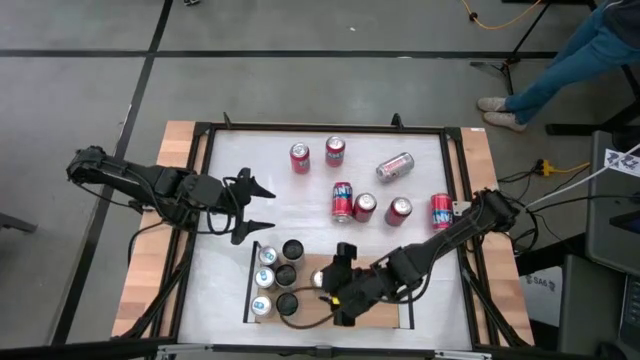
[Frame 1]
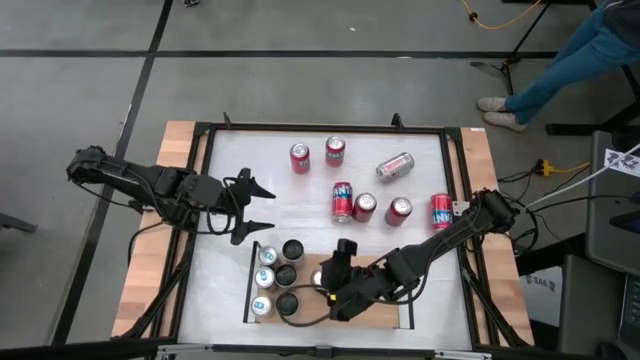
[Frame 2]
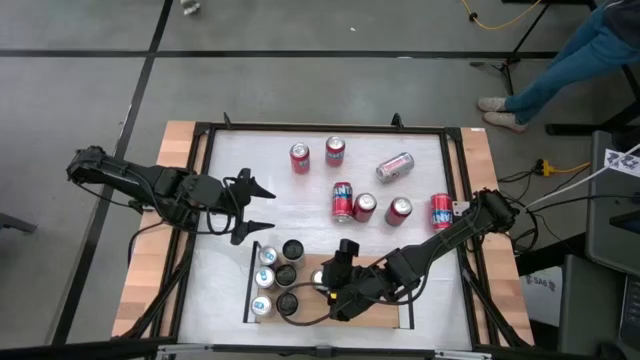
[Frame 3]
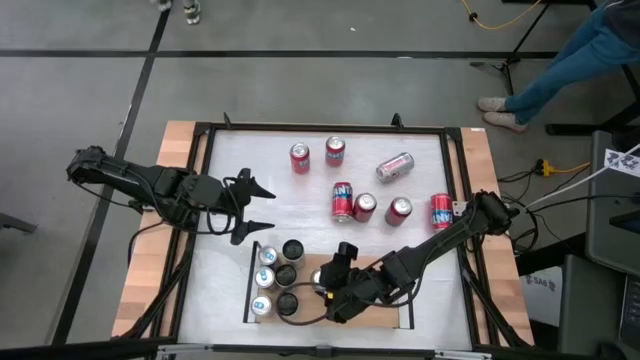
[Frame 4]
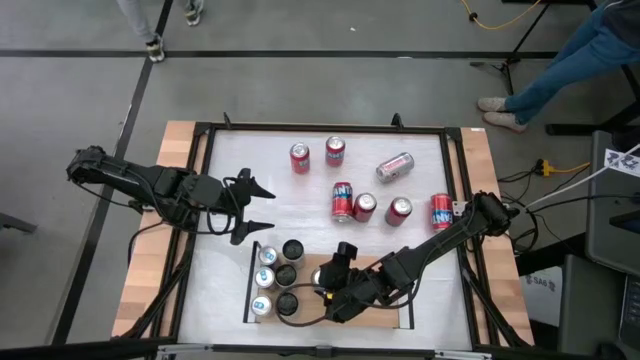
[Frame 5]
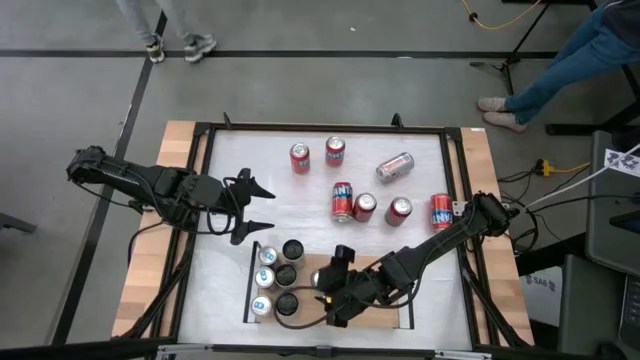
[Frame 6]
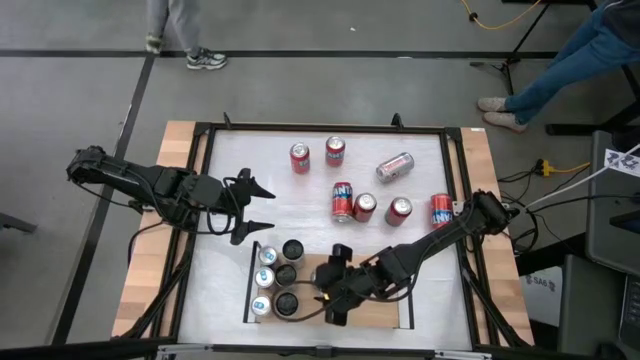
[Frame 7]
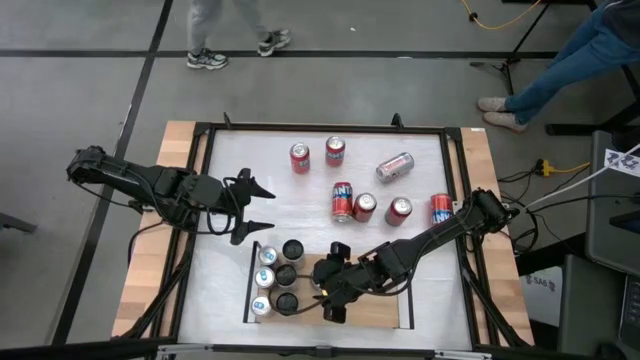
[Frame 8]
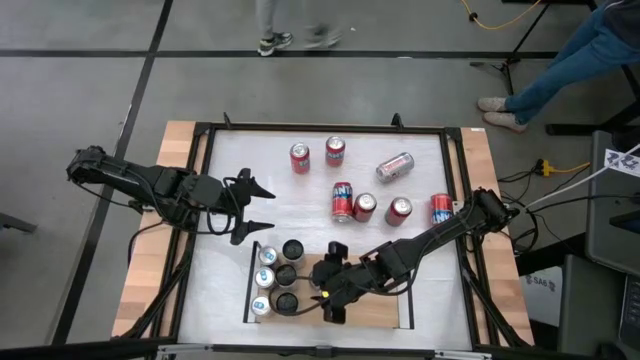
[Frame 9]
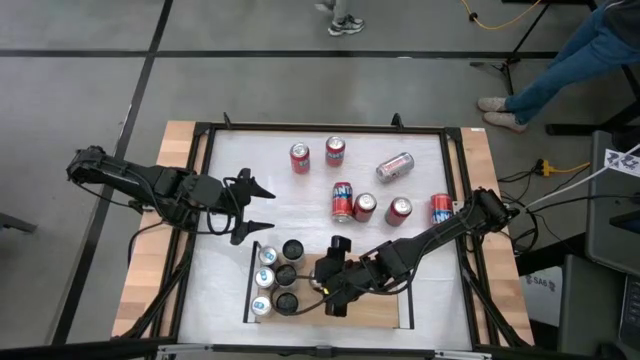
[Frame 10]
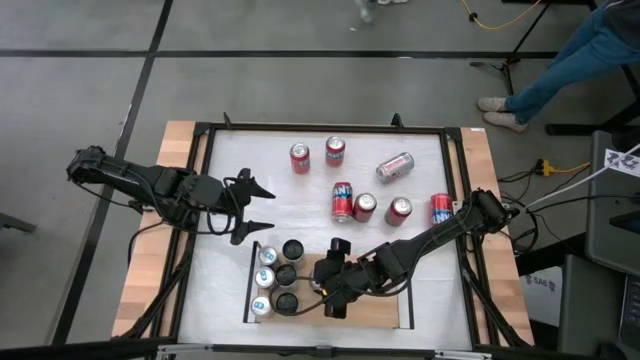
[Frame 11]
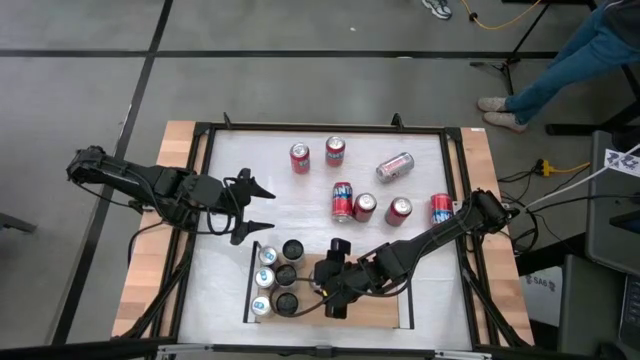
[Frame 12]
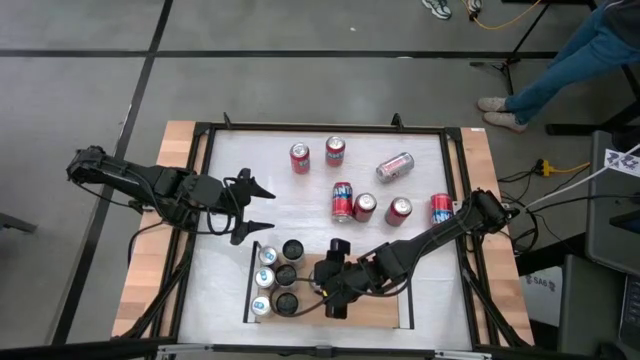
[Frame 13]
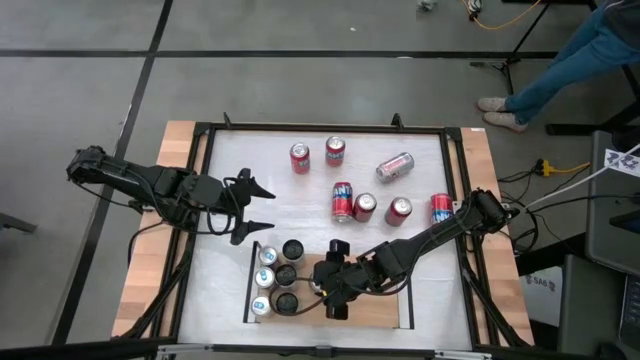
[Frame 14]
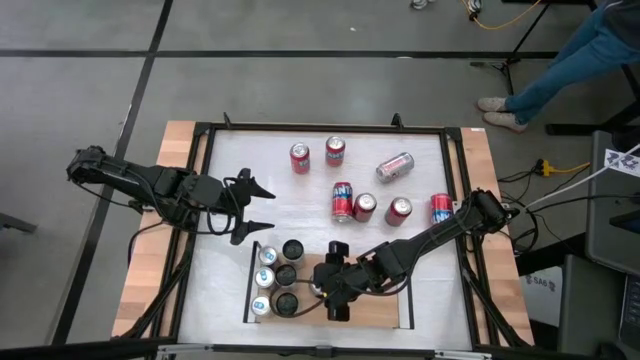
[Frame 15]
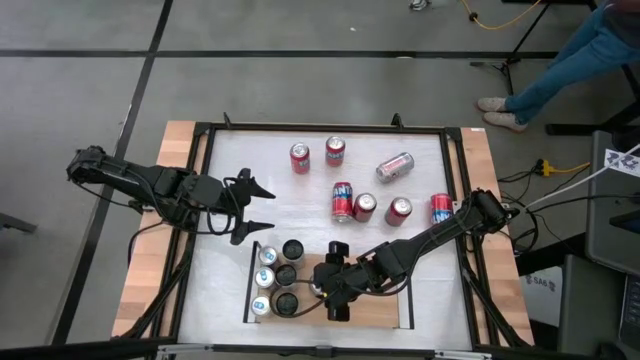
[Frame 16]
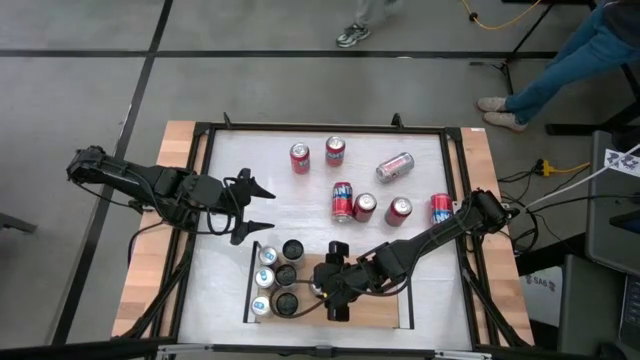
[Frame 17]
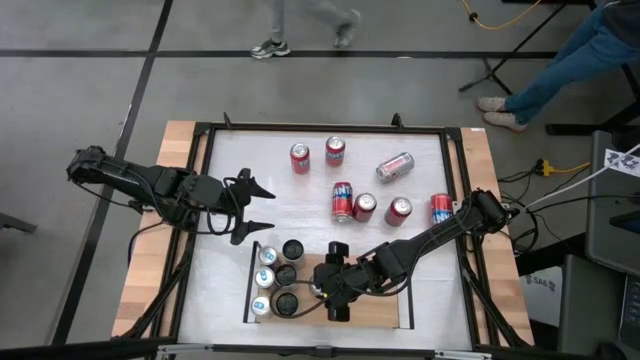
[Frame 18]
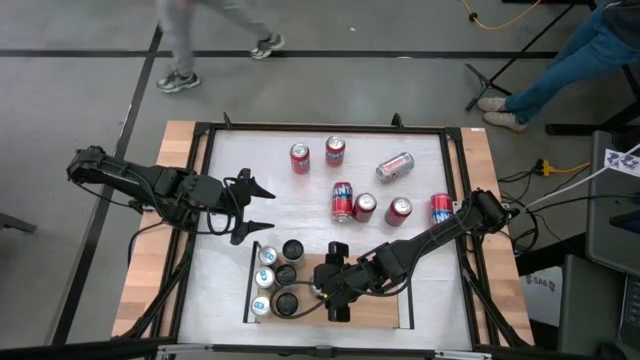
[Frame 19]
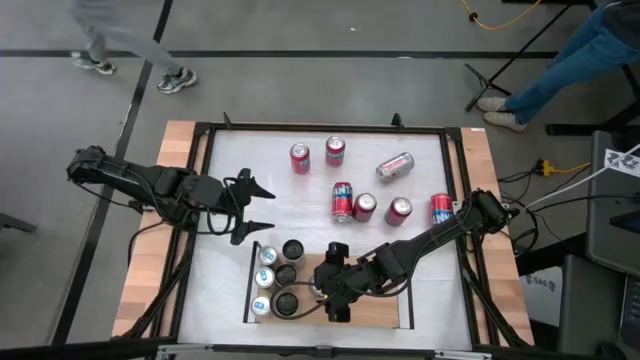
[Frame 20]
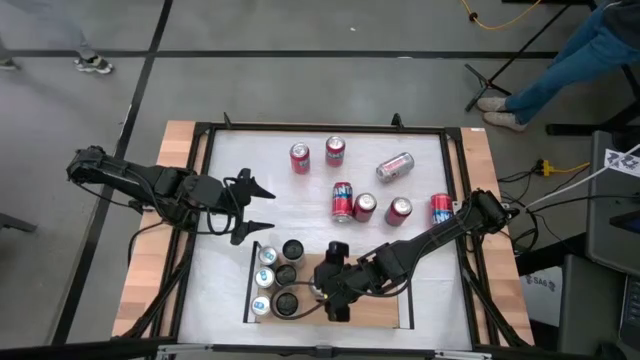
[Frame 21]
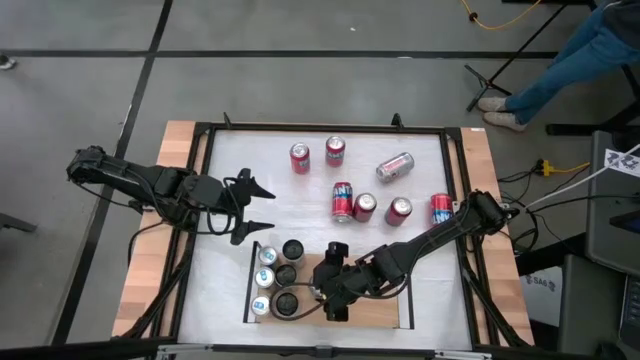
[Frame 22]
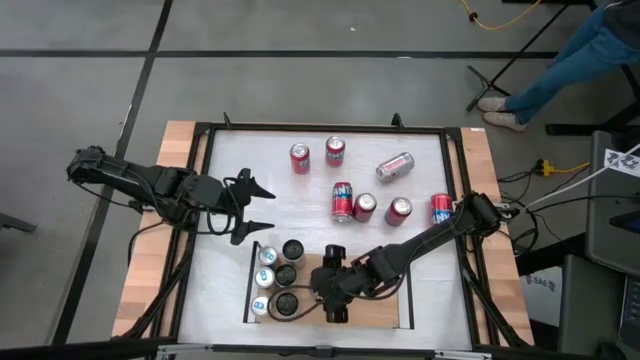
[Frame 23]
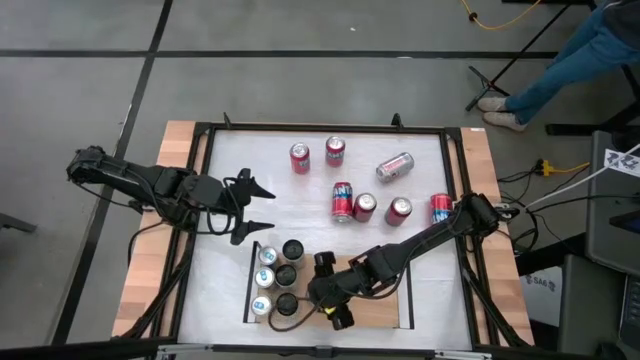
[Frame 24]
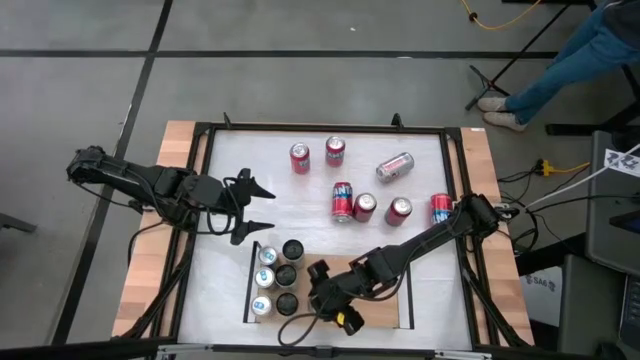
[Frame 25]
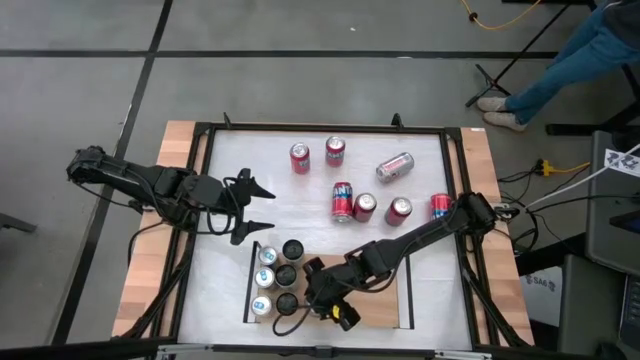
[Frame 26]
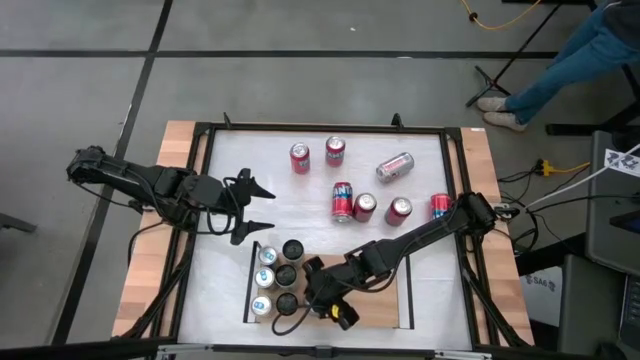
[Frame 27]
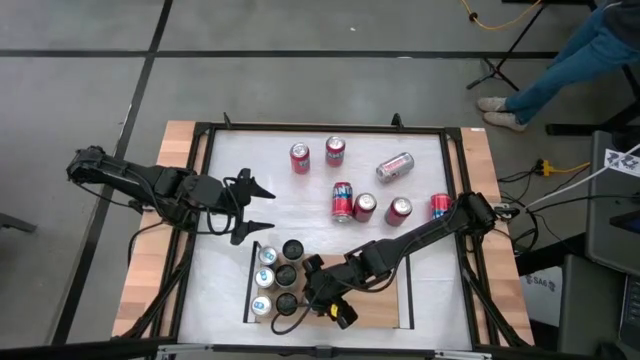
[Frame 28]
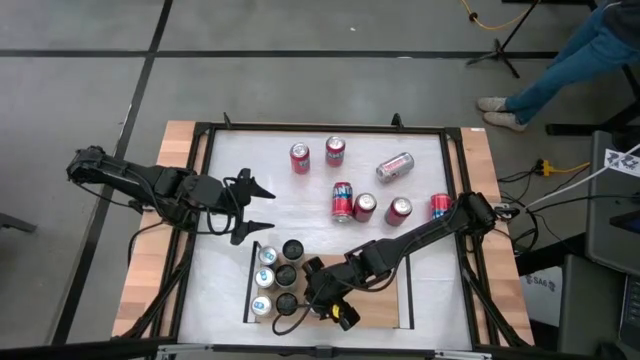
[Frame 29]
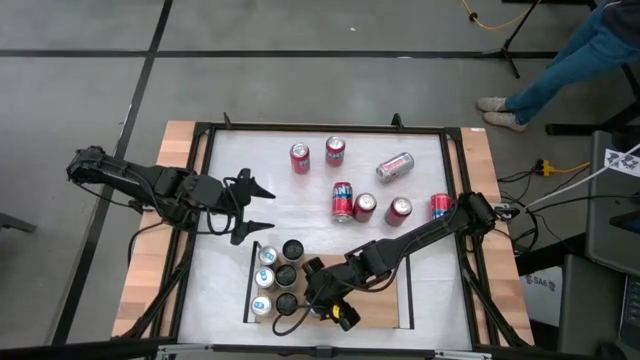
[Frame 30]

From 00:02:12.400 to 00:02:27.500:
Task: Place canned beverage on shelf
Put the left silver soda can on the shelf
